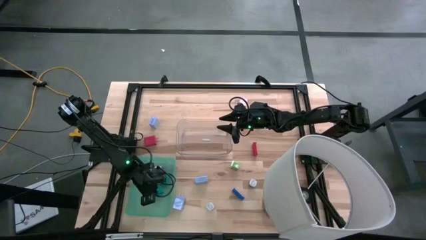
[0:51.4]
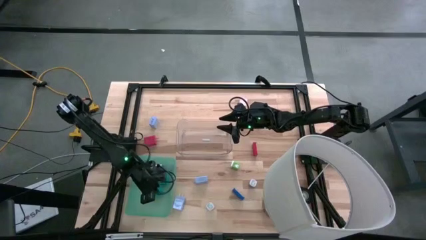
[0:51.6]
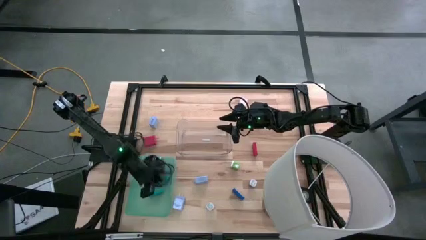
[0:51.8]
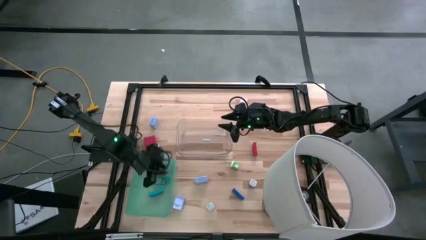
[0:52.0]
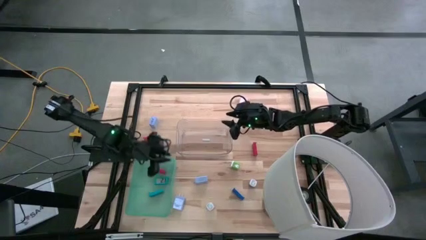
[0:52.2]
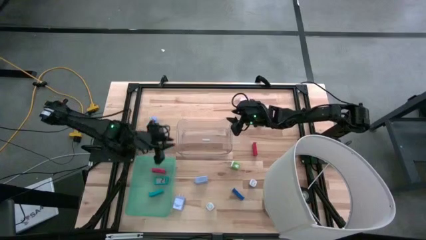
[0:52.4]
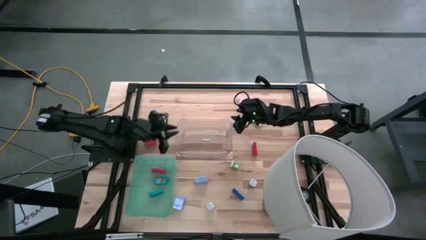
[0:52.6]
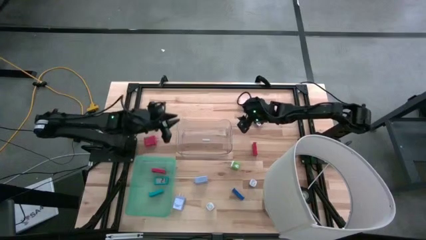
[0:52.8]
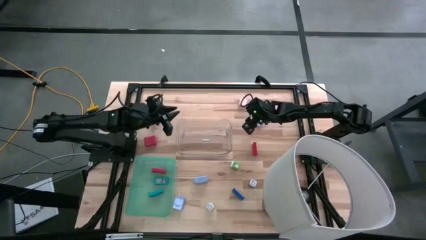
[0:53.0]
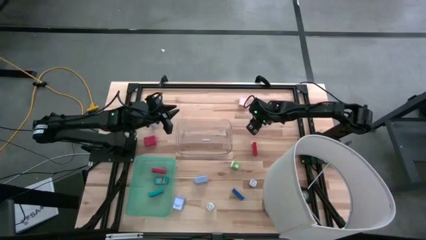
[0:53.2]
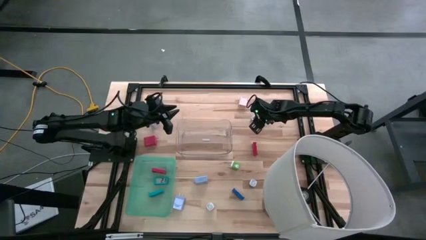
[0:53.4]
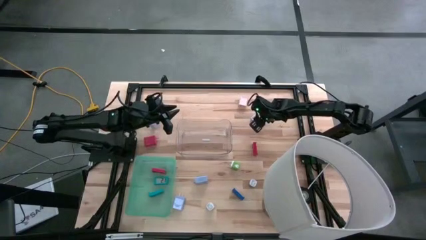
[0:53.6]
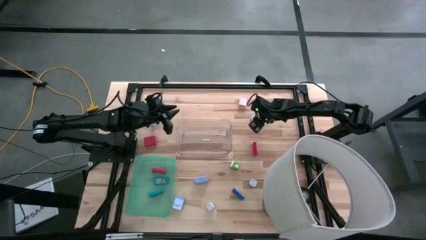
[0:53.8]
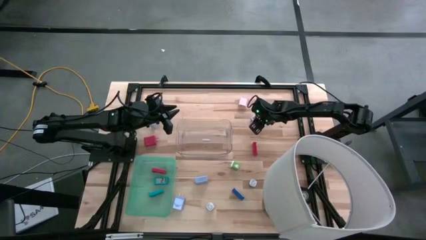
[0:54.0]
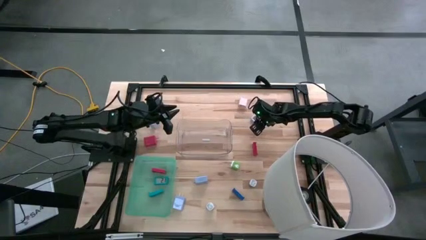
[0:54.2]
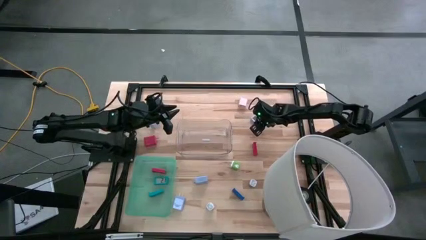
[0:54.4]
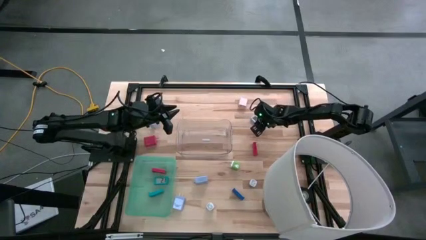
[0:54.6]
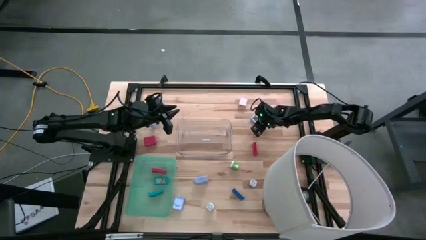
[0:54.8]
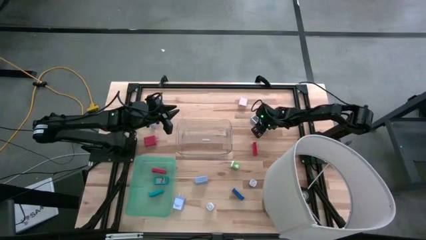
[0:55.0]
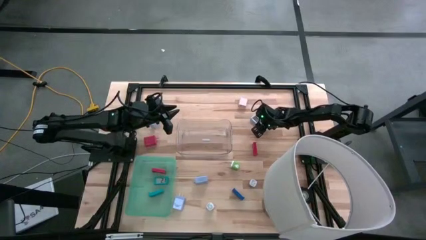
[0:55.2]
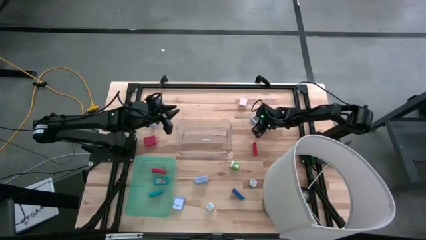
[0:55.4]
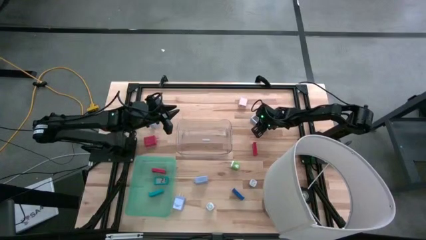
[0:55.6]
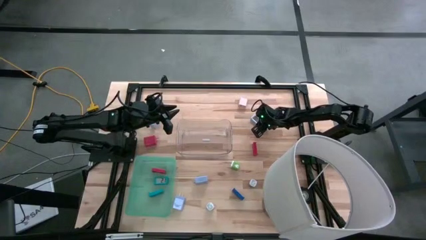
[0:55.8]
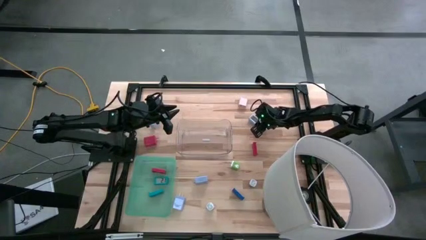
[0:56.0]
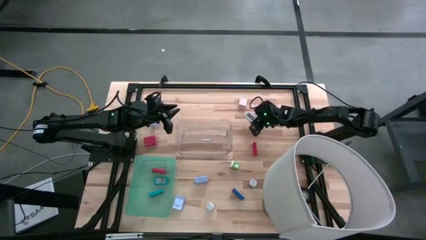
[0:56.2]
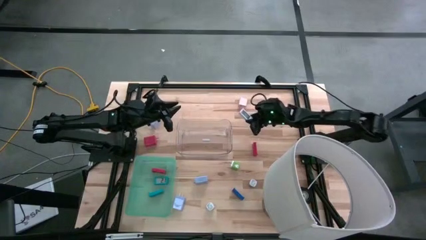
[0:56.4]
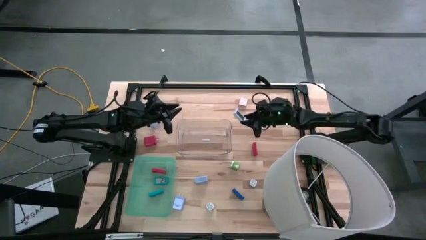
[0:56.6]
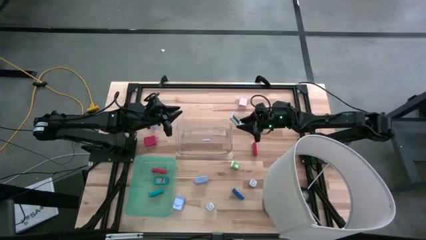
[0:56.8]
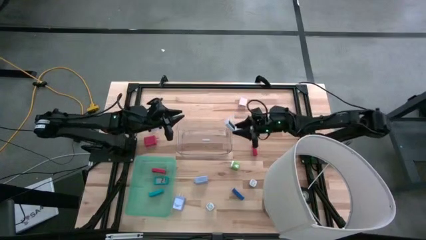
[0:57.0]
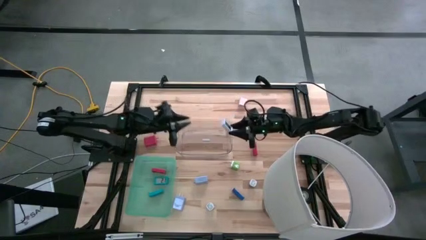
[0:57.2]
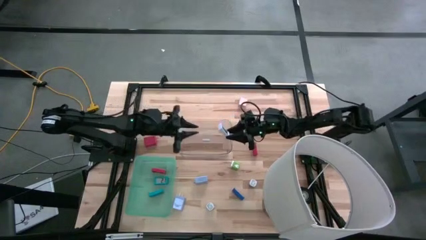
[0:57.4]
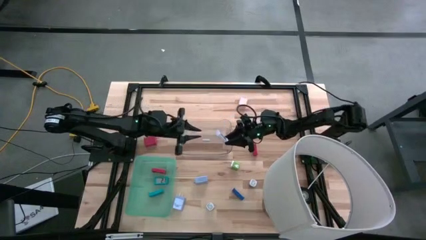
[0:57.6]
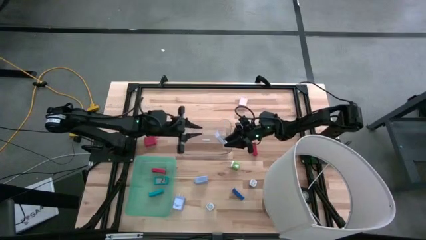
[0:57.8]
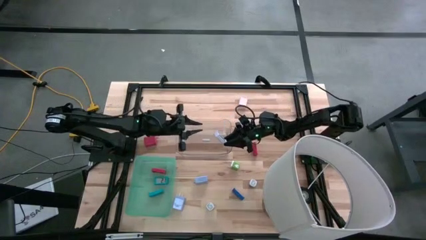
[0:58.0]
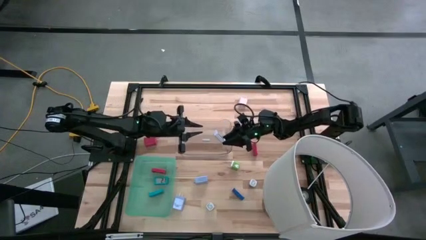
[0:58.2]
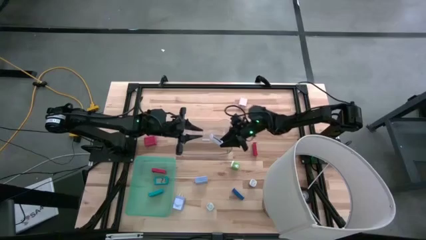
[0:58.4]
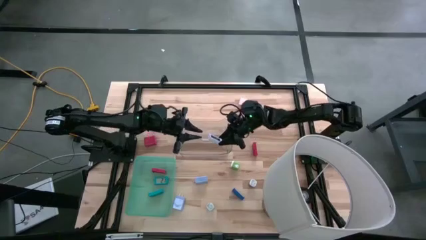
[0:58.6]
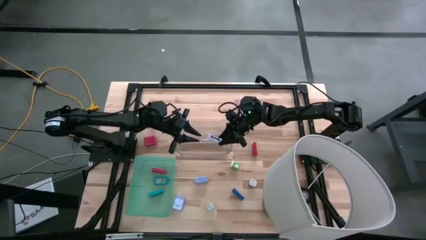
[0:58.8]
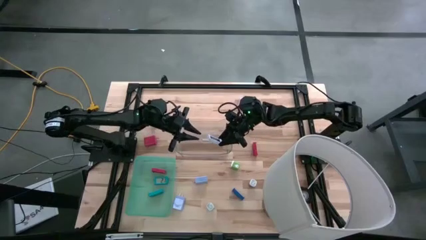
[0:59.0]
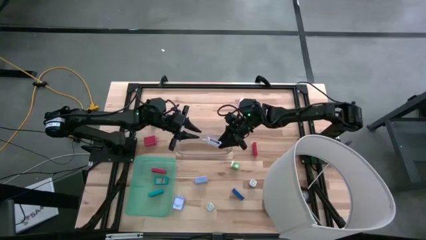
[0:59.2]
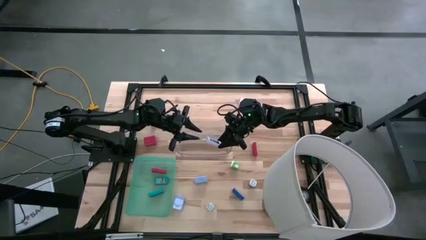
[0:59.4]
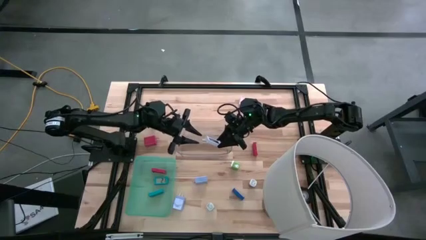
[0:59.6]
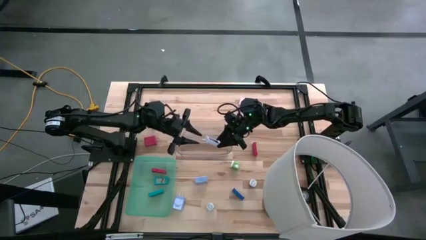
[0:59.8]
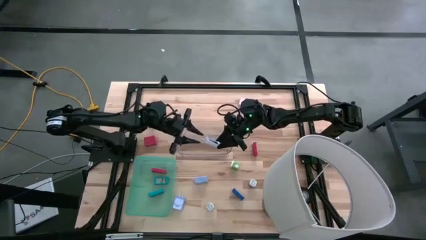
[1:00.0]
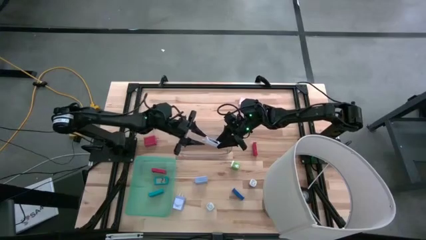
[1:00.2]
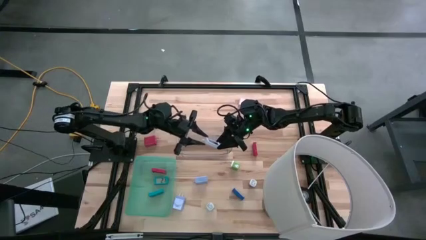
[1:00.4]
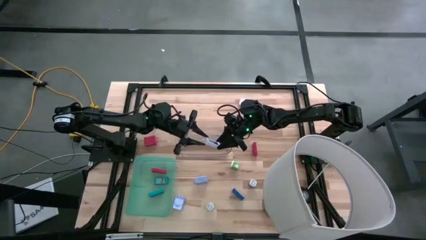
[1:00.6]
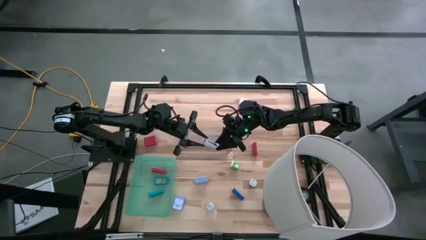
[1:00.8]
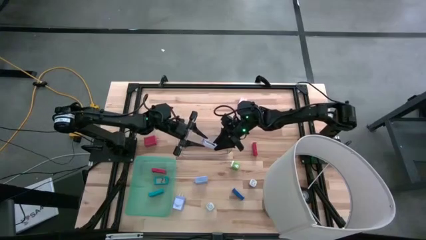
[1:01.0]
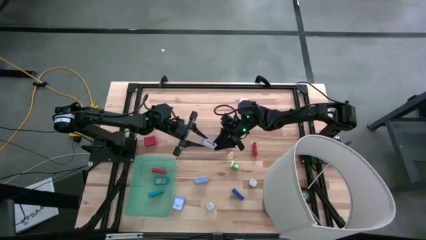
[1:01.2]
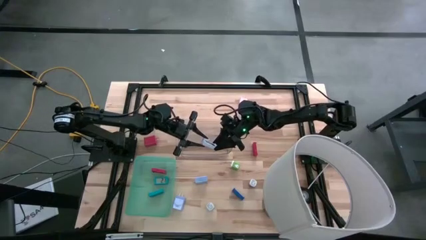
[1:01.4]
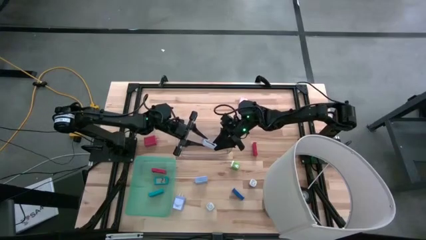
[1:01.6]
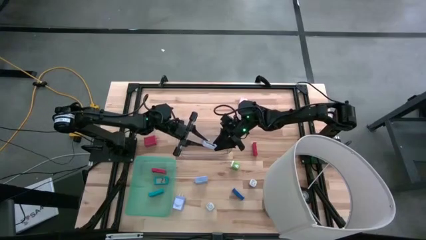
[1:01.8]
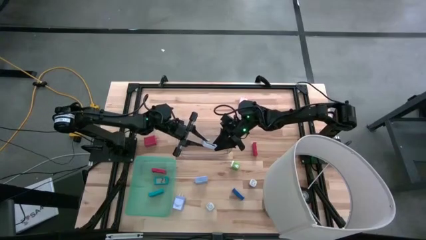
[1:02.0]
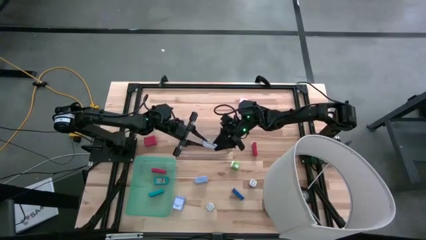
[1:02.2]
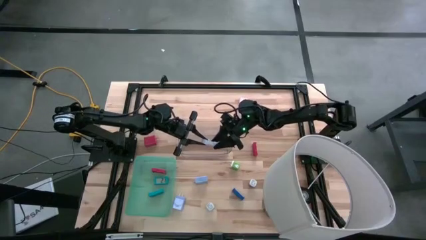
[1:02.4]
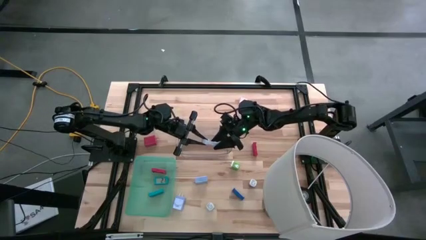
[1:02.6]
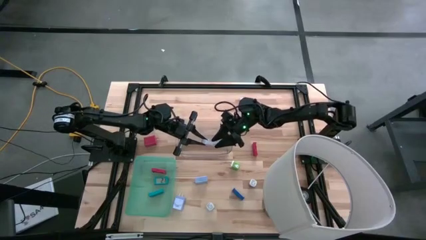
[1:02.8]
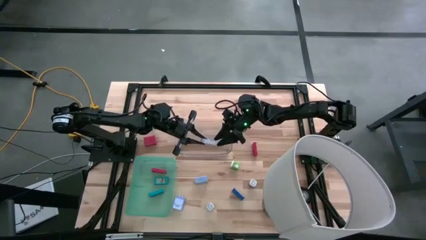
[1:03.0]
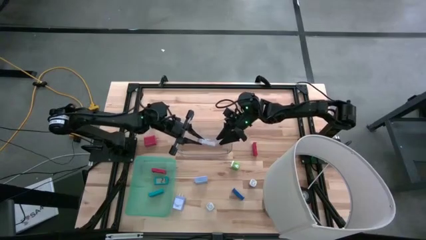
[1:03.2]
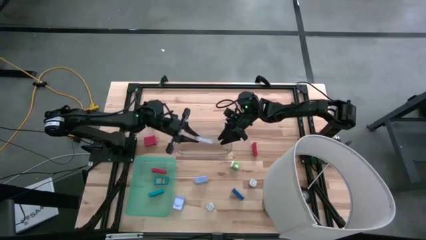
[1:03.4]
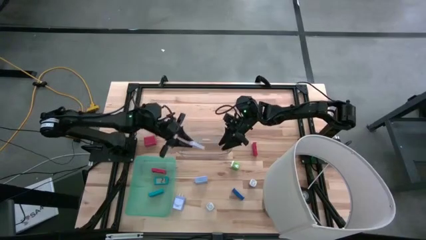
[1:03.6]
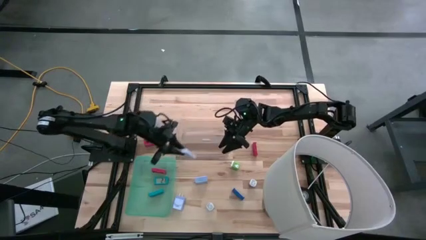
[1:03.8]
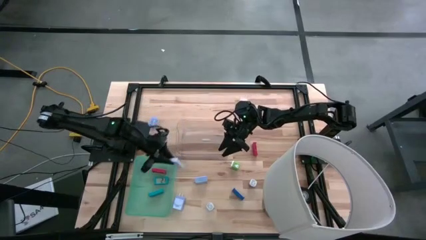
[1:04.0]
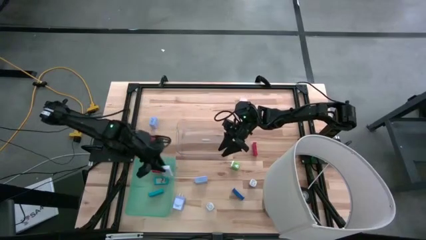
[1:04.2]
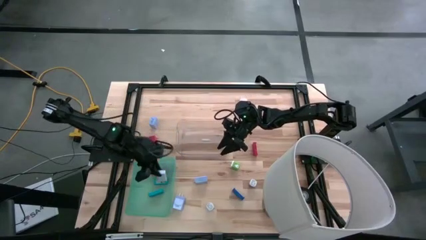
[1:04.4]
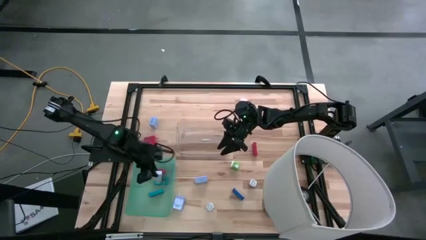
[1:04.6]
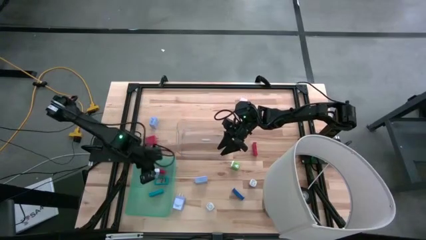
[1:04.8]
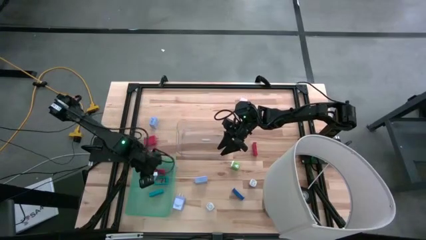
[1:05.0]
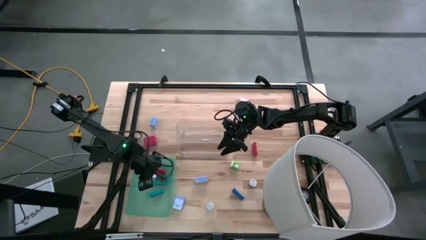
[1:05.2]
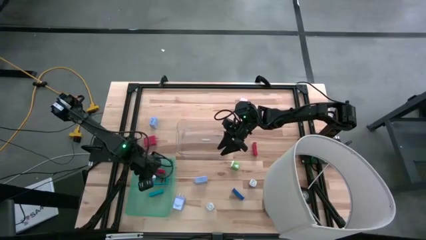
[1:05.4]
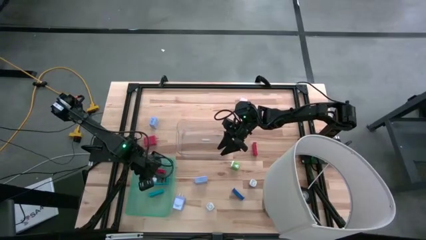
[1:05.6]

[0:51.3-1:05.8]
Task: Pick & Place Office items
Put the white digital clock into the green bin

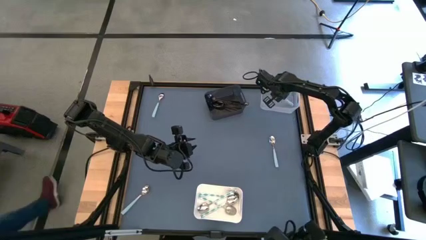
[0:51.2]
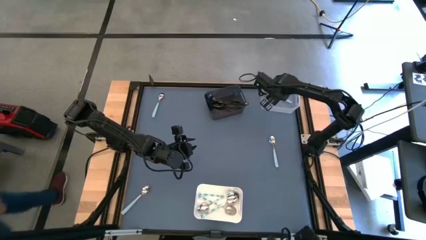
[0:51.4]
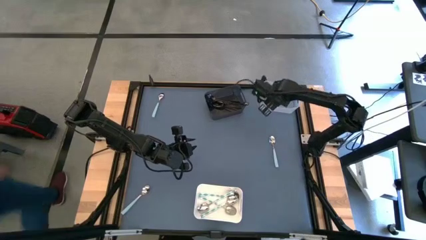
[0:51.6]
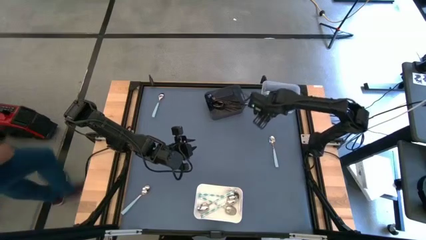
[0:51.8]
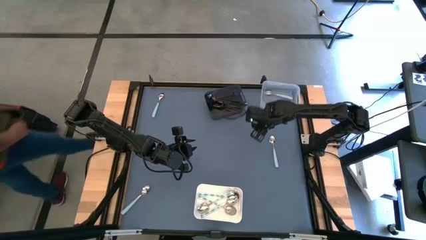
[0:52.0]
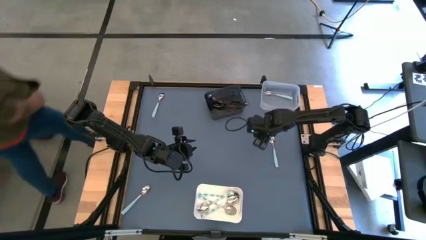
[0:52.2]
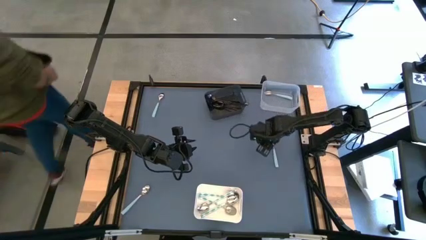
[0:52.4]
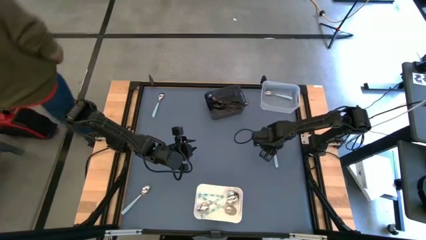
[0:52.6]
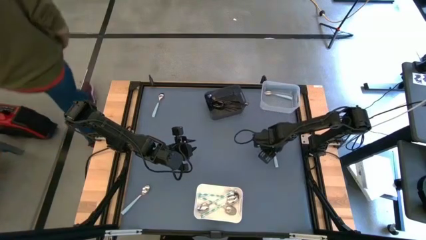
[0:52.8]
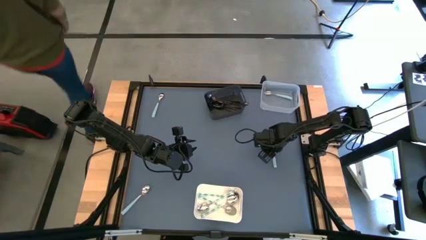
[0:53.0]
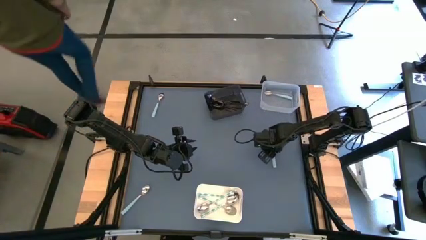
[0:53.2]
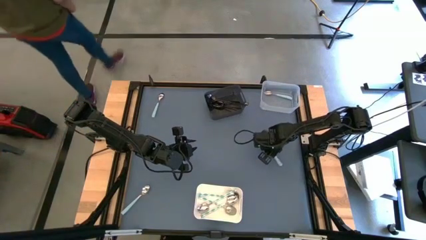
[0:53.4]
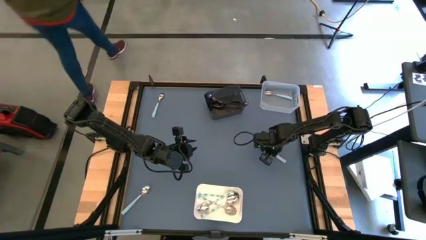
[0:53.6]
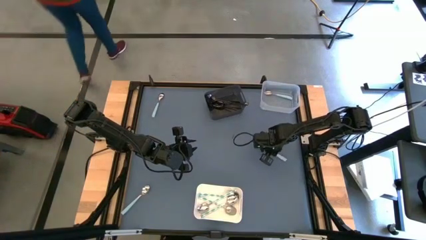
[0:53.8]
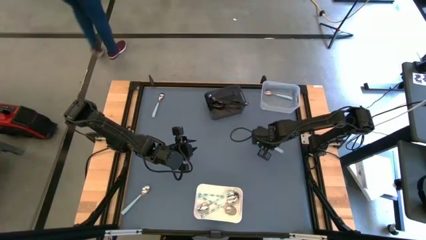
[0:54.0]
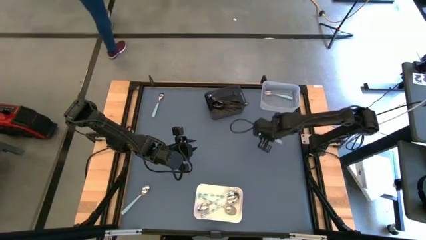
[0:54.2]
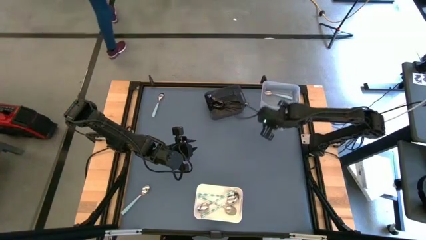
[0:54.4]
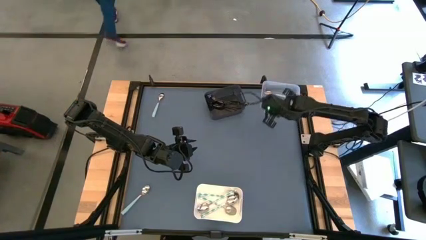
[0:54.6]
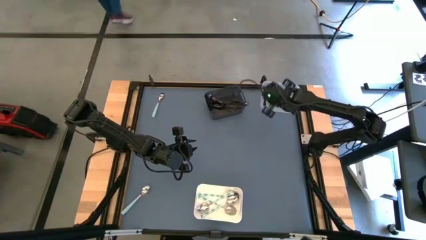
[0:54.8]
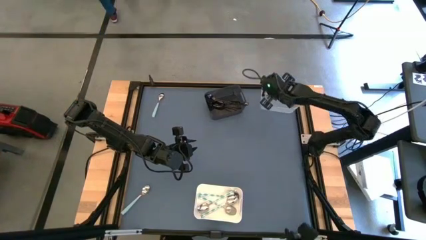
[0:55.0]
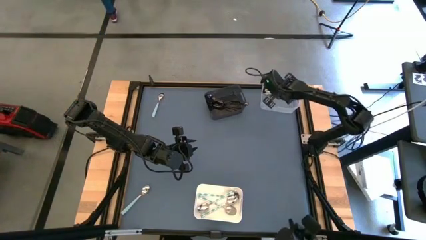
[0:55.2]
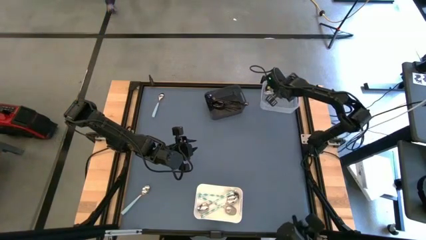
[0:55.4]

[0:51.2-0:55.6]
Task: Sort silverware by color (type)
Put the blue spoon into the transparent bin
